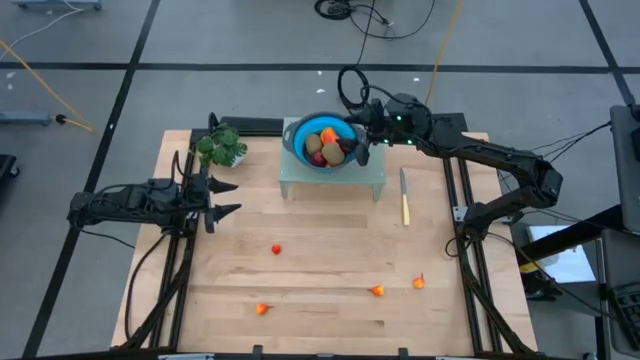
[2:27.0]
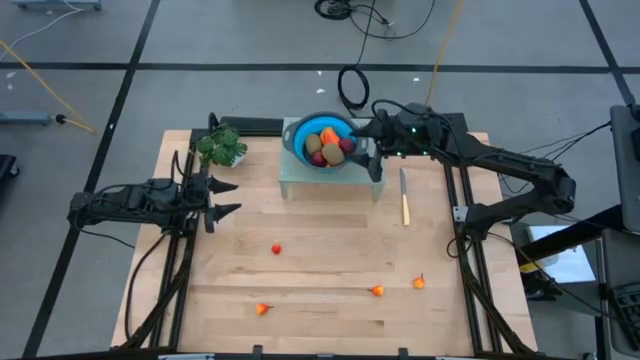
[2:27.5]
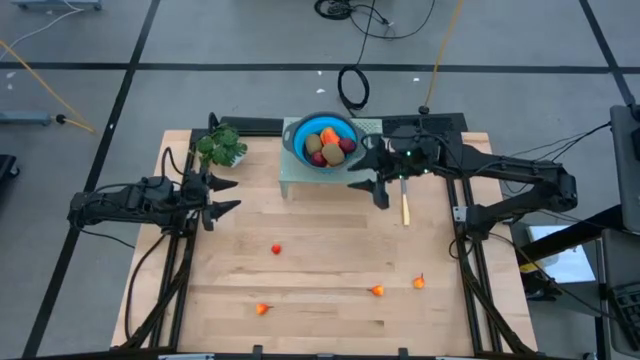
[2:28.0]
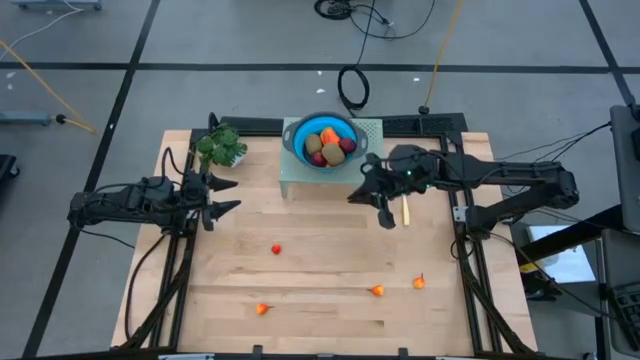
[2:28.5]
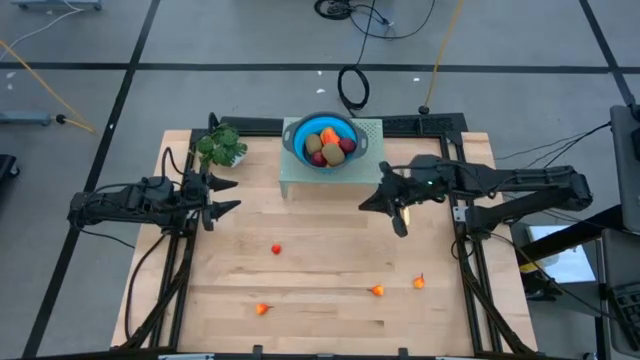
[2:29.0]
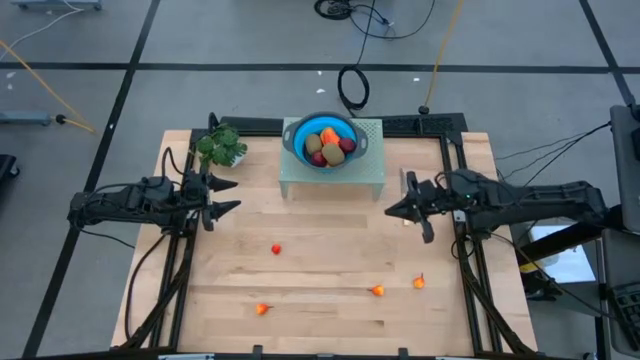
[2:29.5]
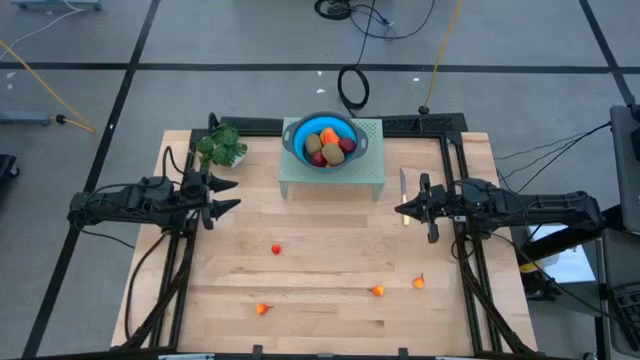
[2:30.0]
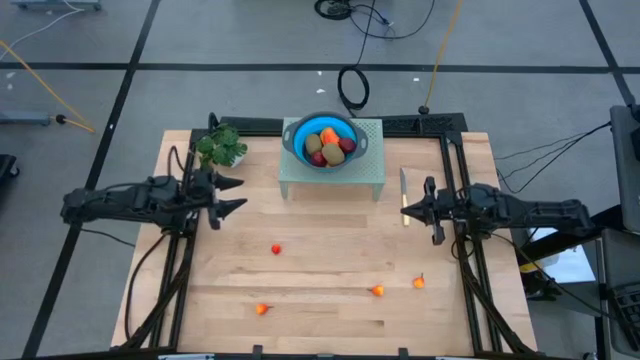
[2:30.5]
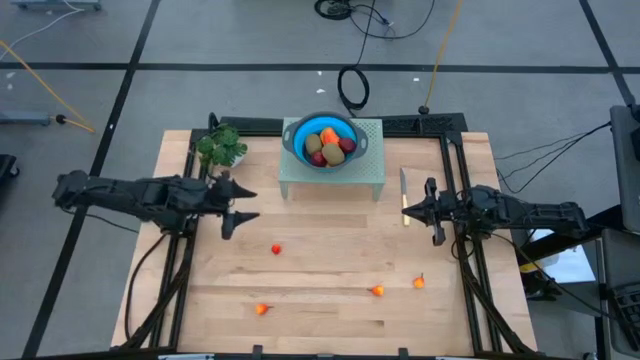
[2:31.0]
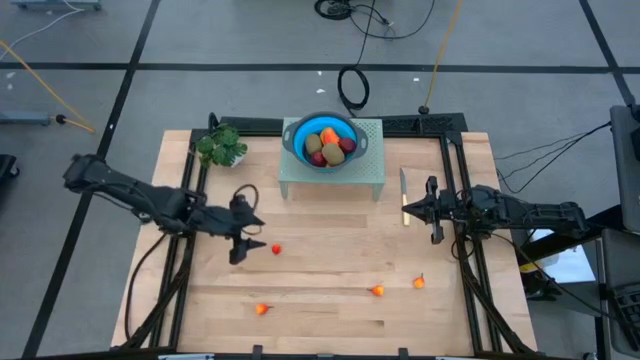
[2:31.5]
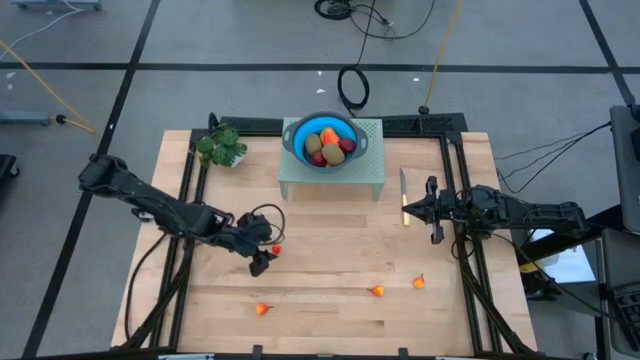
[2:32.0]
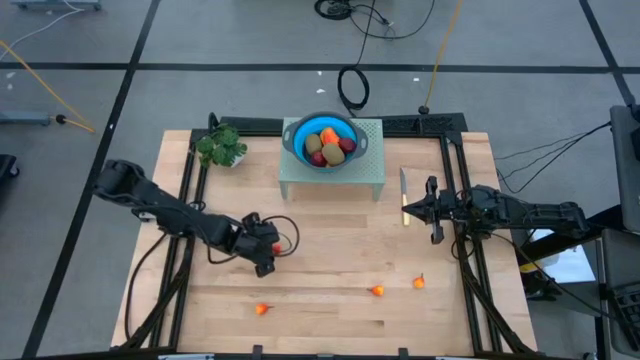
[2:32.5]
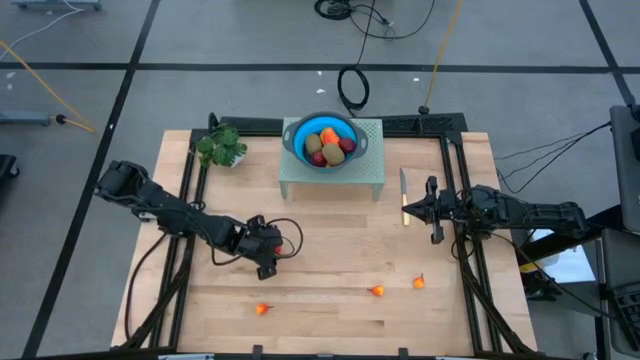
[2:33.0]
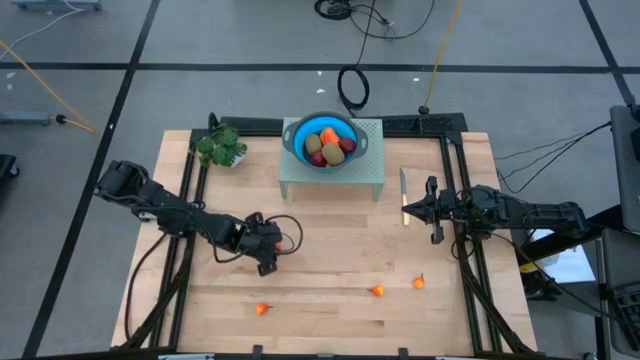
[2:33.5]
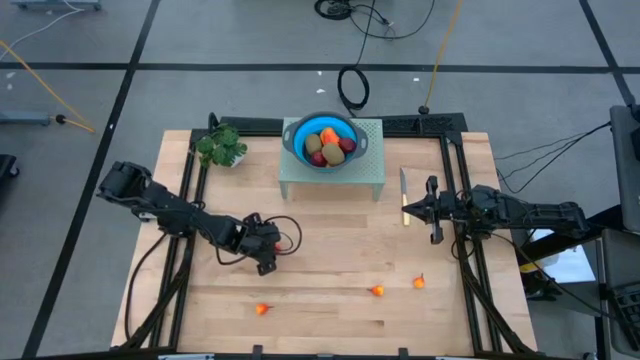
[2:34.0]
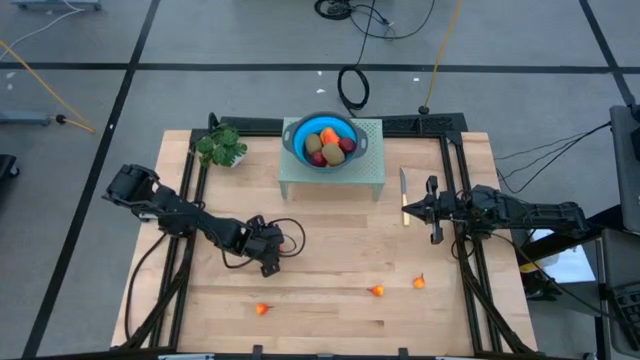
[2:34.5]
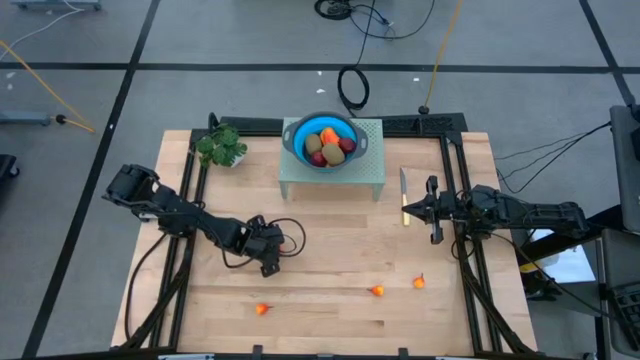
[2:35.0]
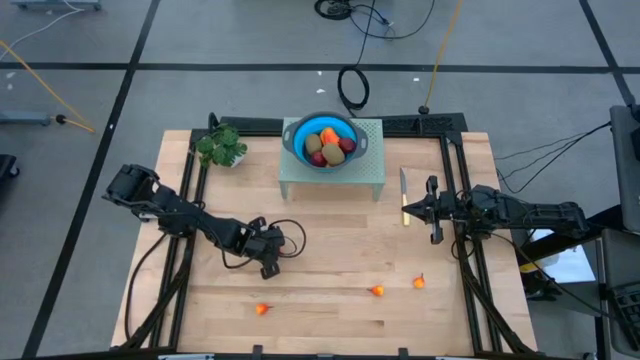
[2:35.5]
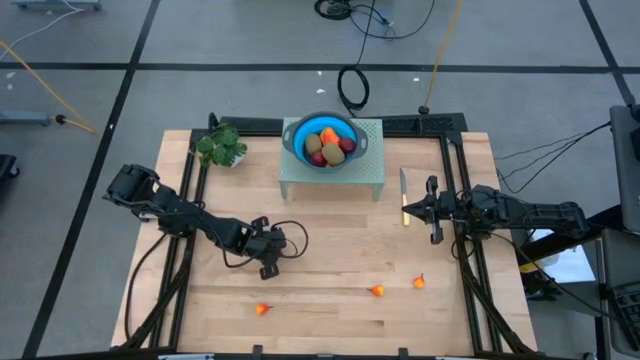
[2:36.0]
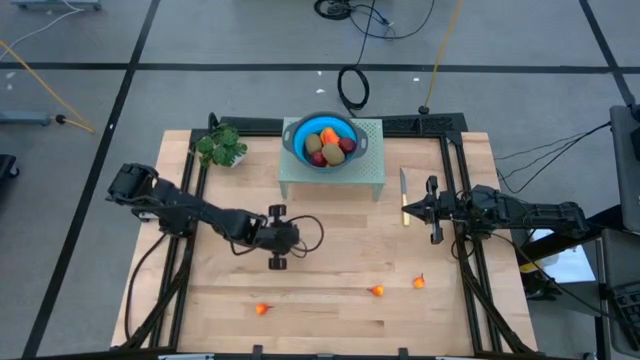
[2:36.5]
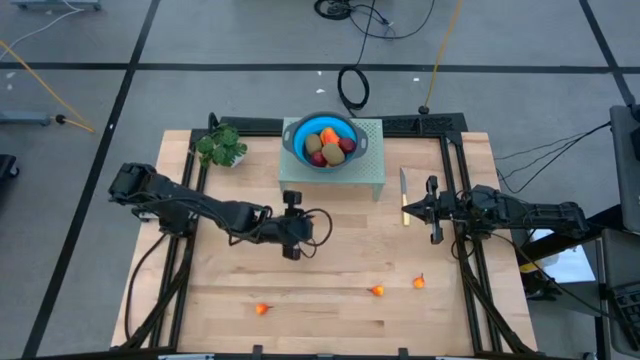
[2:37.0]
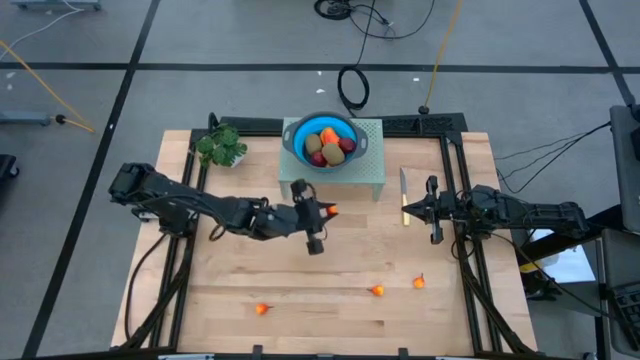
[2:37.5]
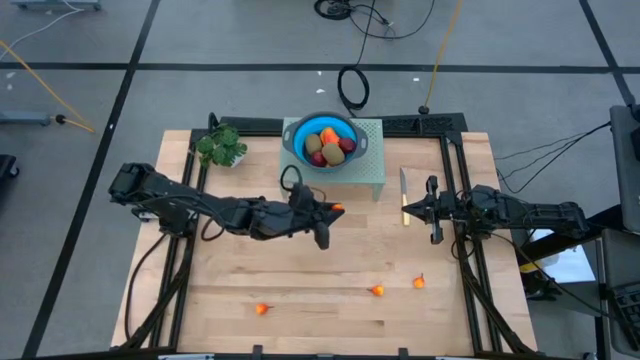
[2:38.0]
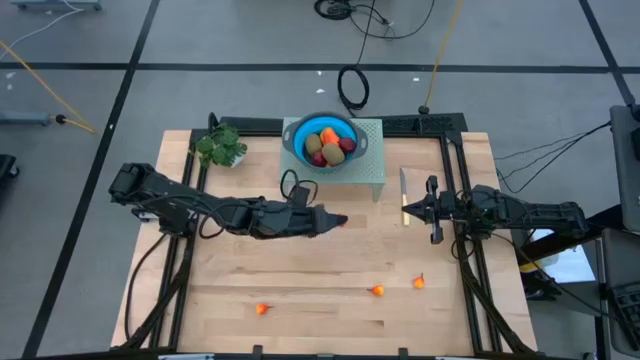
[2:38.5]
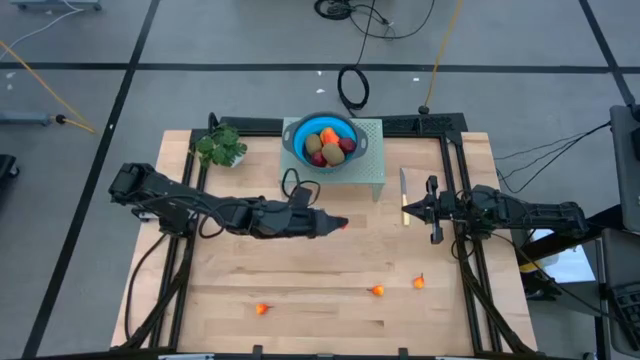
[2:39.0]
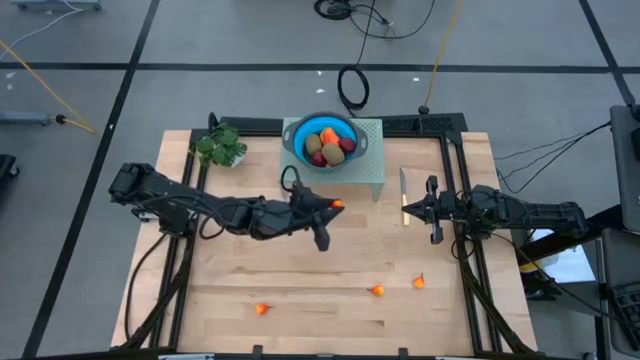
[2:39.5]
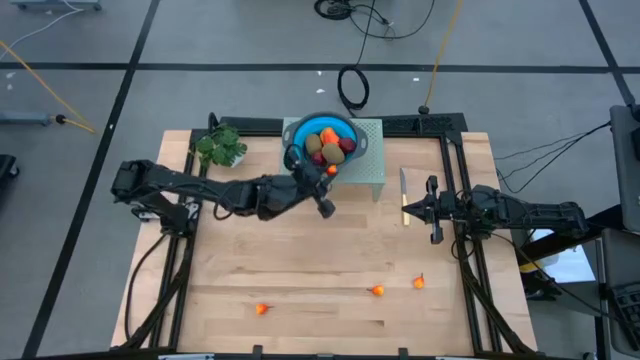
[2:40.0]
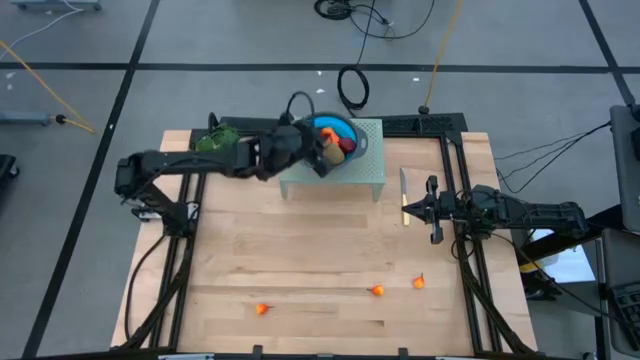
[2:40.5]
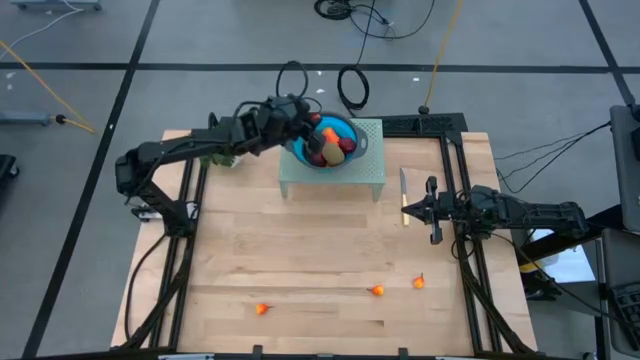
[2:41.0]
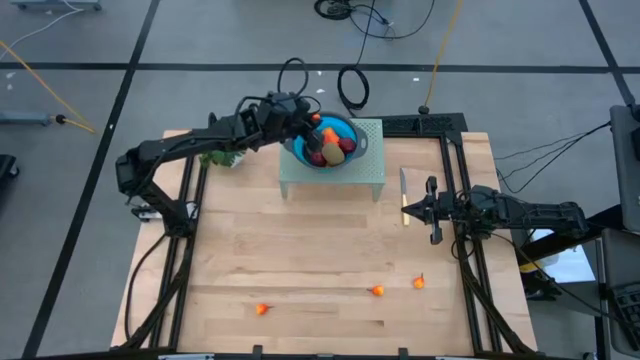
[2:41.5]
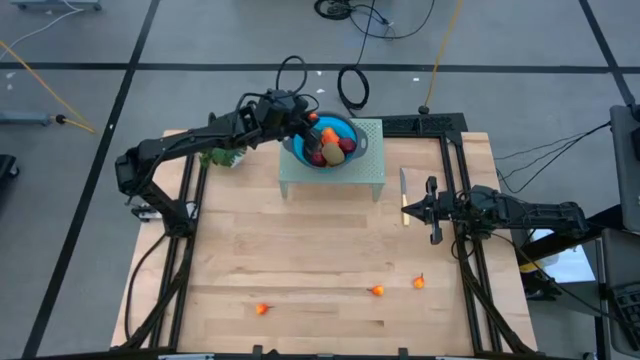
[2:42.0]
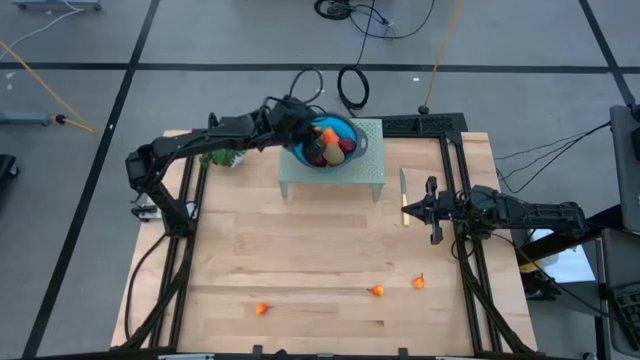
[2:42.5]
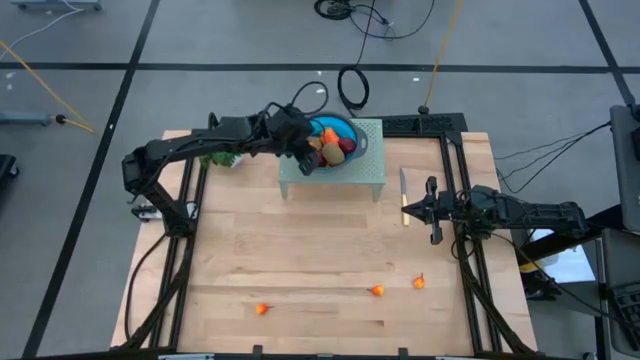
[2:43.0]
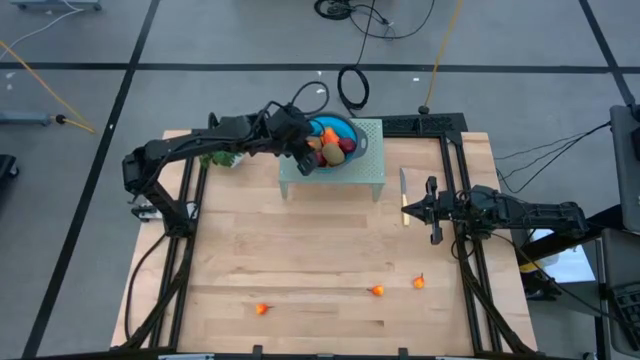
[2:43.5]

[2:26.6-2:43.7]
Task: Pick & Place Fruit
Put the peach into the colander on the shelf

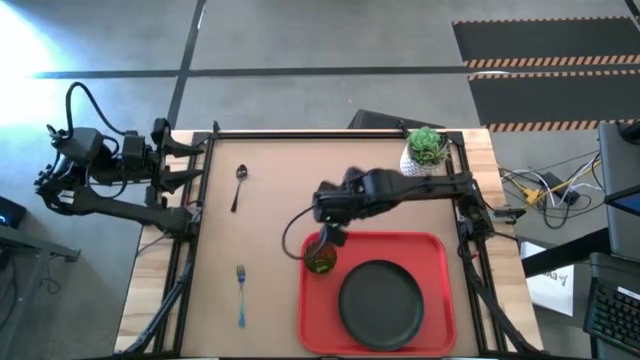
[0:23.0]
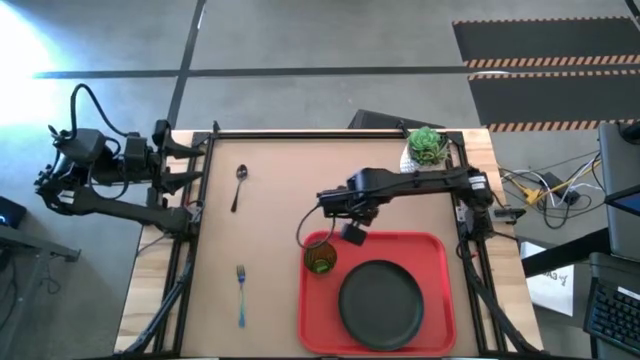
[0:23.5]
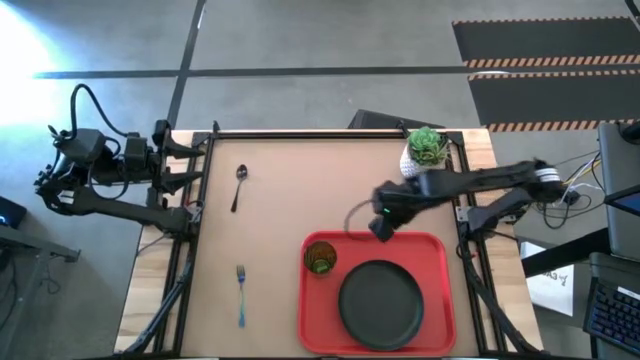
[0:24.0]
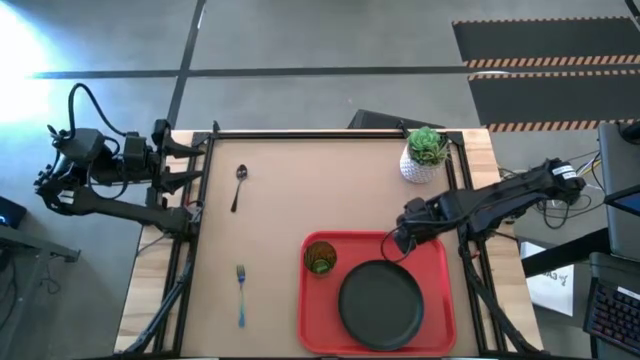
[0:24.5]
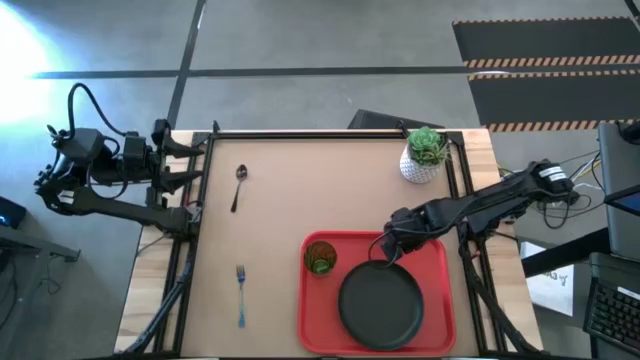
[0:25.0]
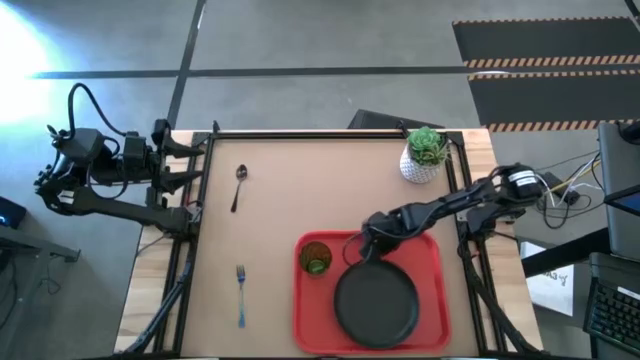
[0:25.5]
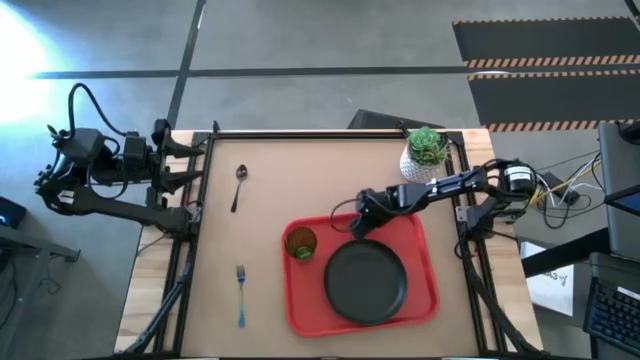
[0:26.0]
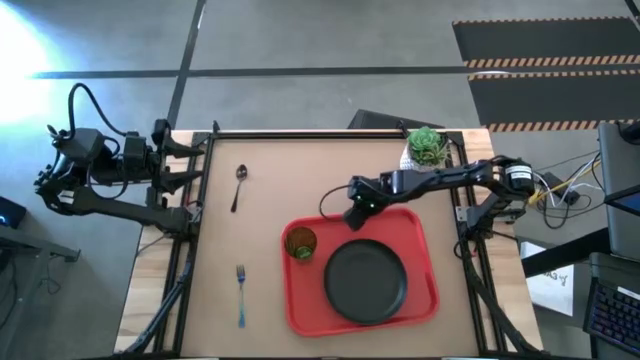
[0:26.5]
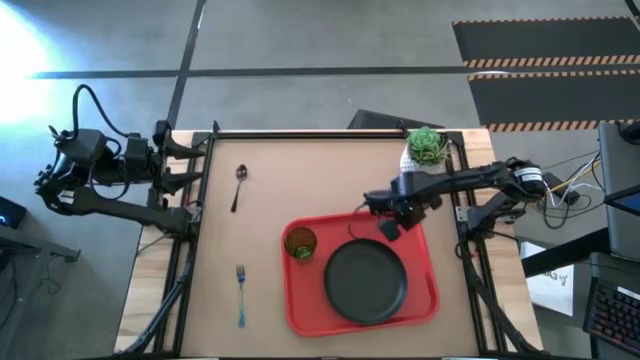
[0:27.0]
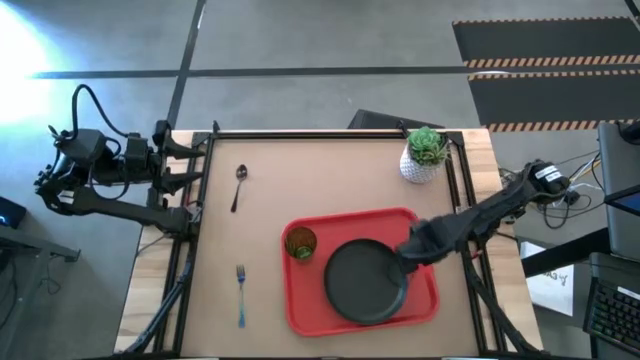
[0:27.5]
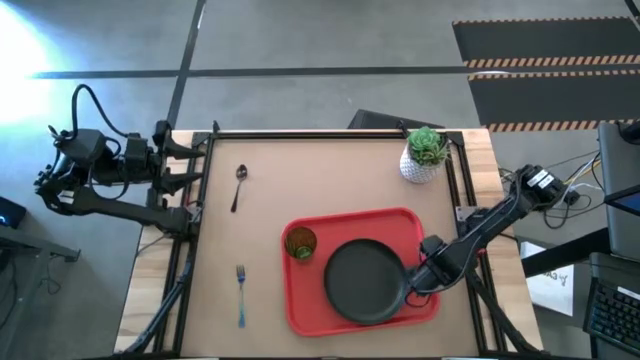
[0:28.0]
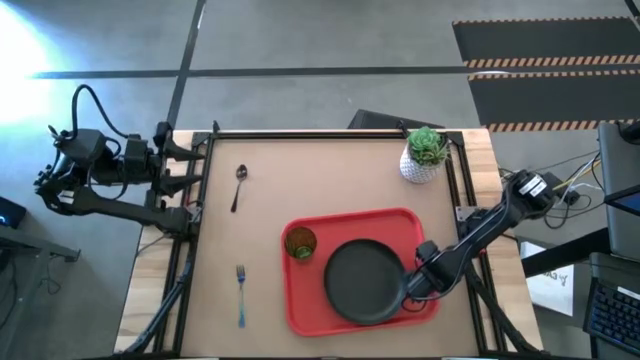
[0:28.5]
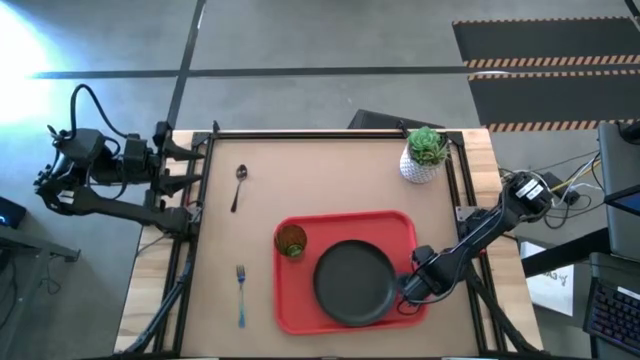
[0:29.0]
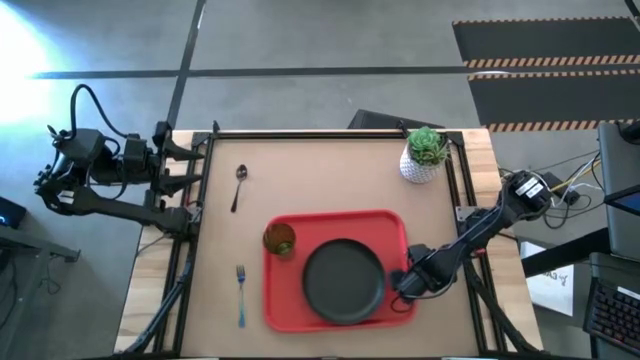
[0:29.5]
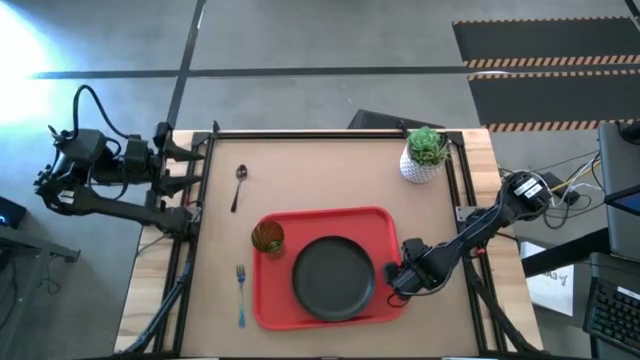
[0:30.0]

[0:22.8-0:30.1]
Task: Pick and place plate/cup/fork/spoon on tray
Adjust the red serving tray
